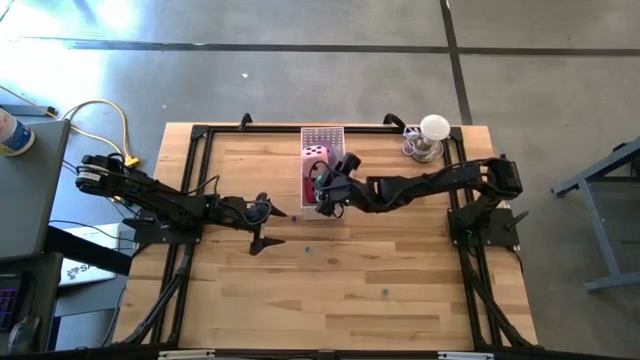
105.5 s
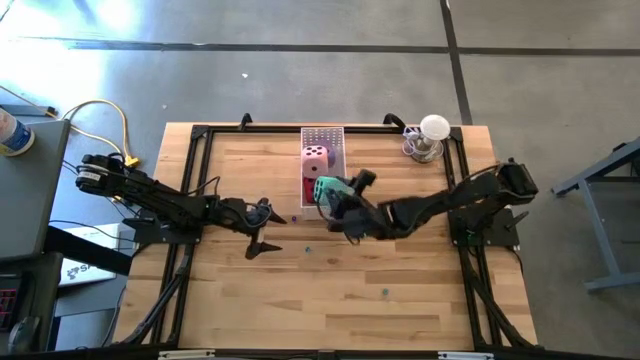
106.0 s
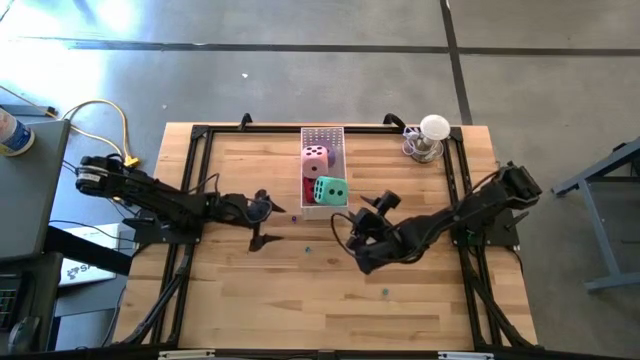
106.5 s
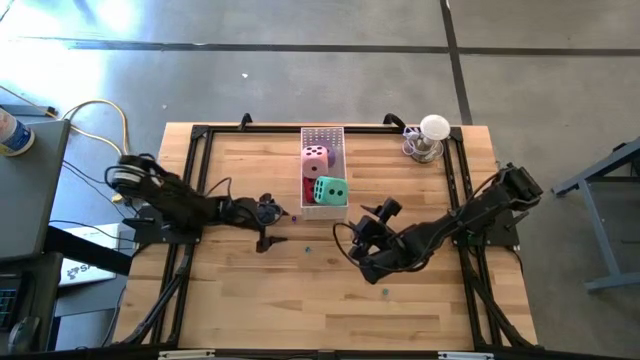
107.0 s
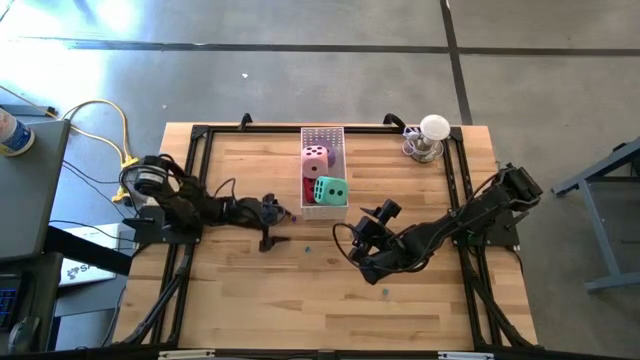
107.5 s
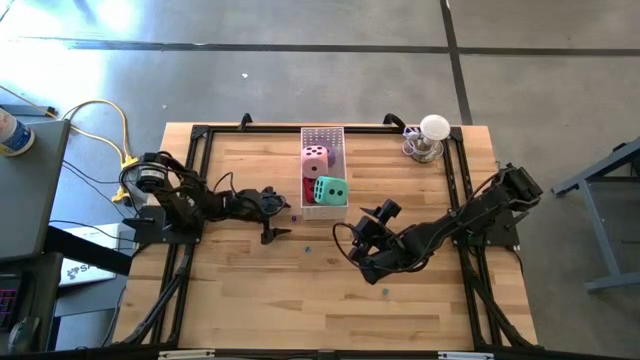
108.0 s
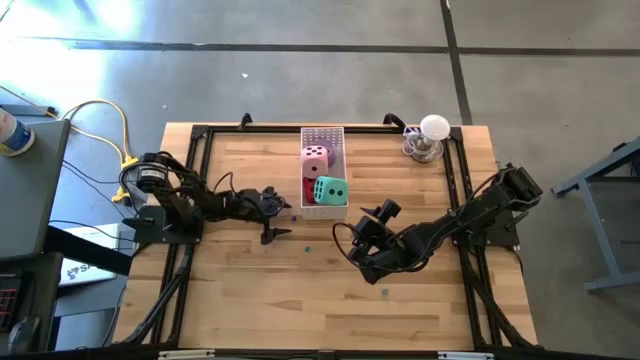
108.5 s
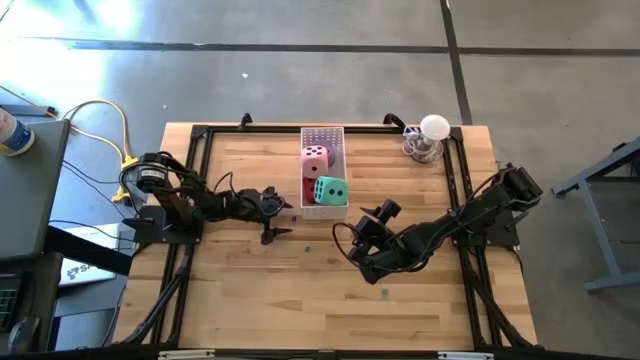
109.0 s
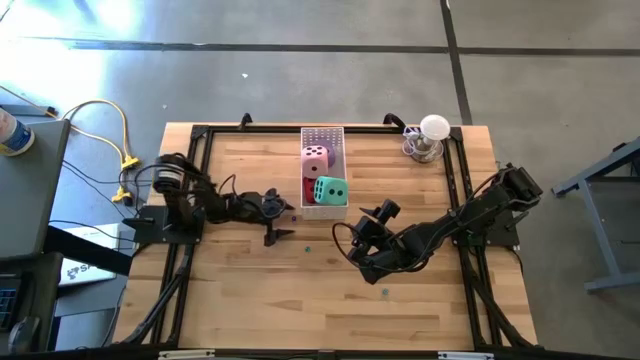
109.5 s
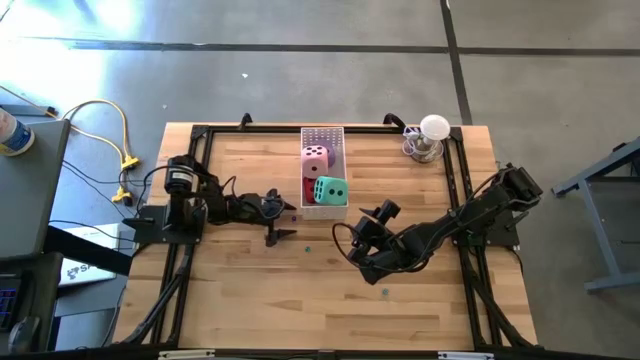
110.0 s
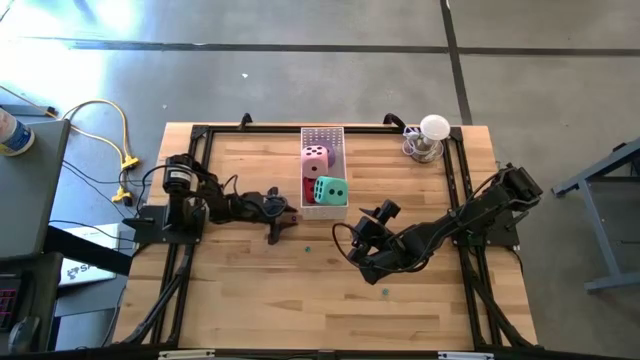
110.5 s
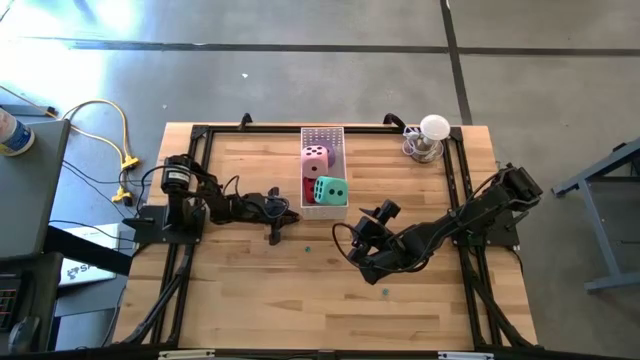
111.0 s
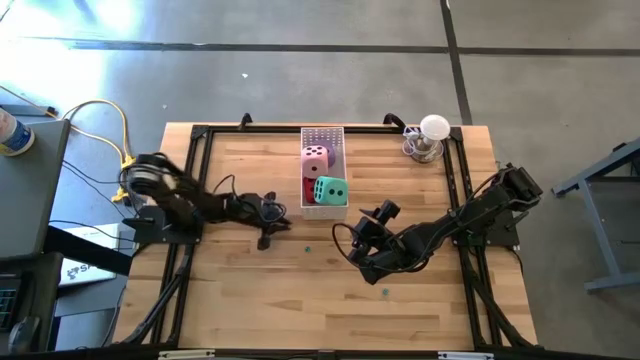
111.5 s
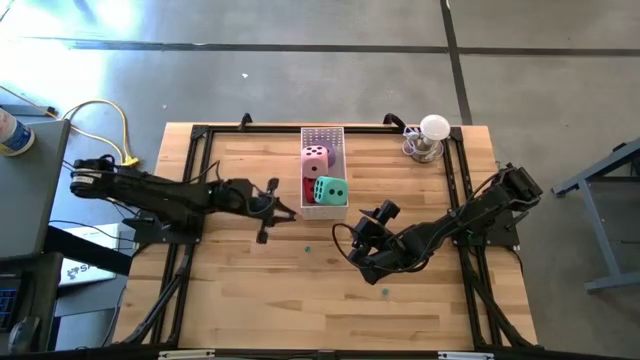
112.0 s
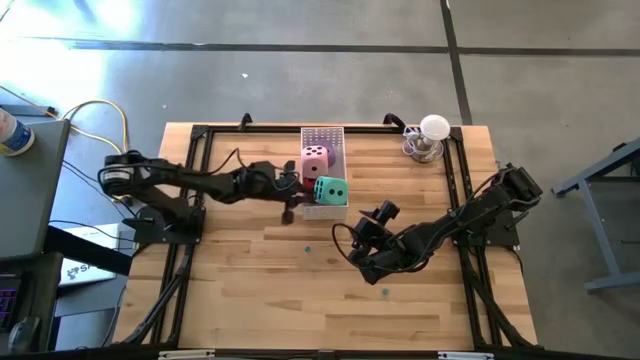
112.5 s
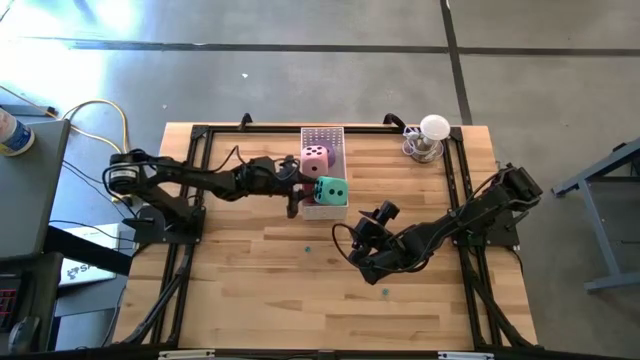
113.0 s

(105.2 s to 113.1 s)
Task: Pick & Place Dice
Put the small dark blue die into the bin

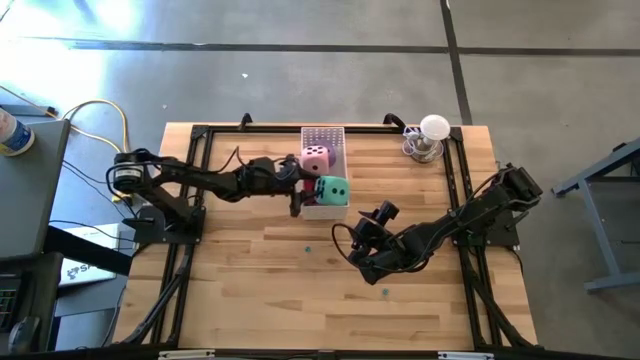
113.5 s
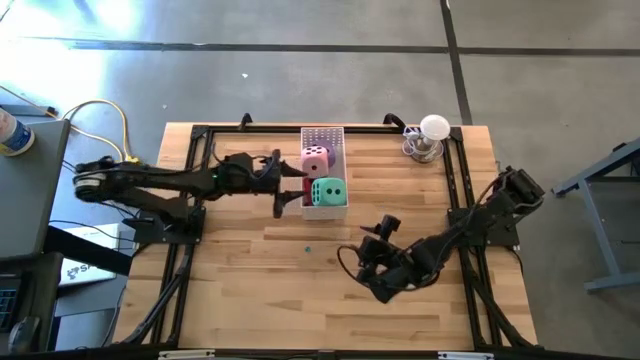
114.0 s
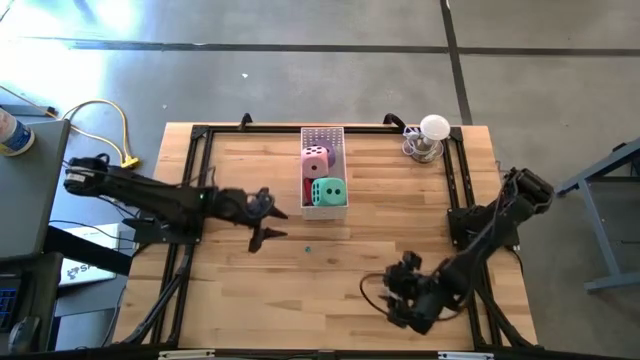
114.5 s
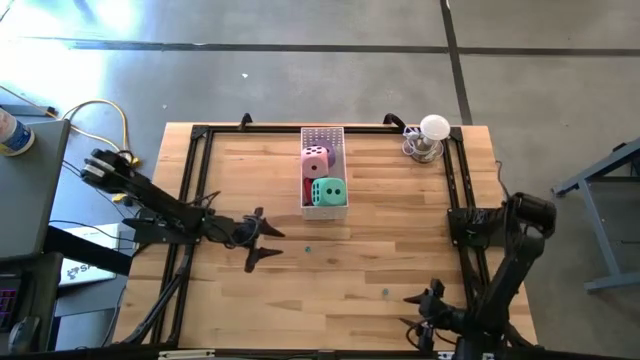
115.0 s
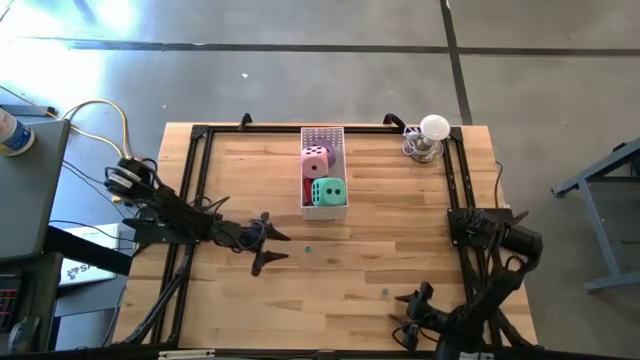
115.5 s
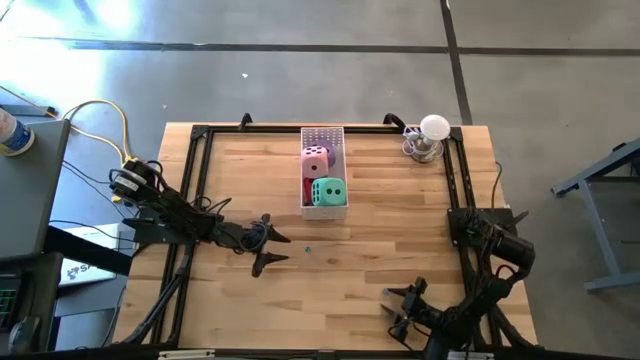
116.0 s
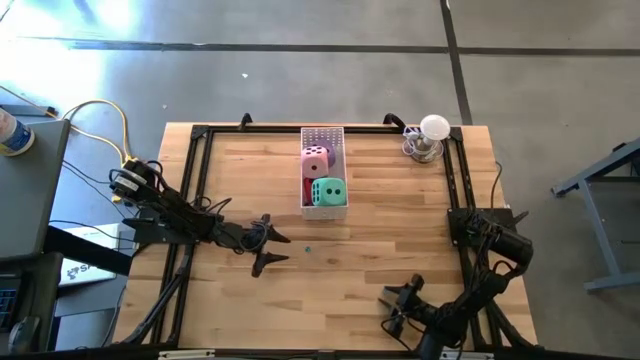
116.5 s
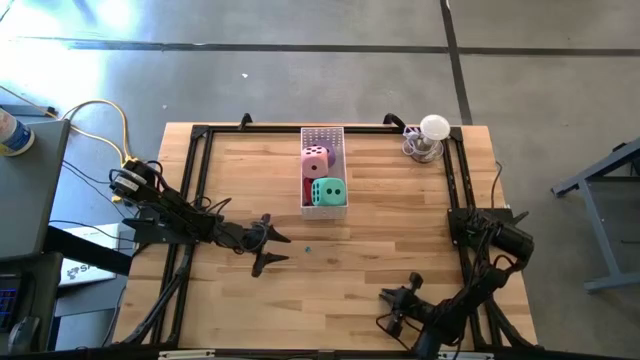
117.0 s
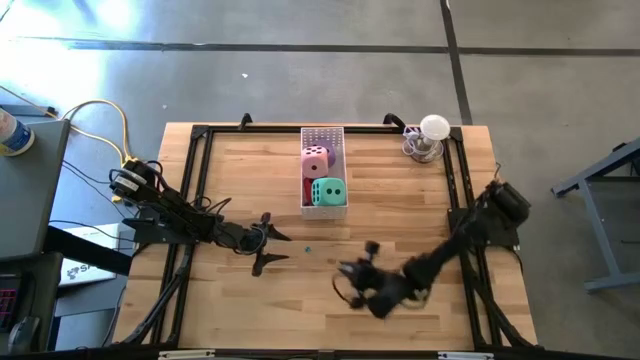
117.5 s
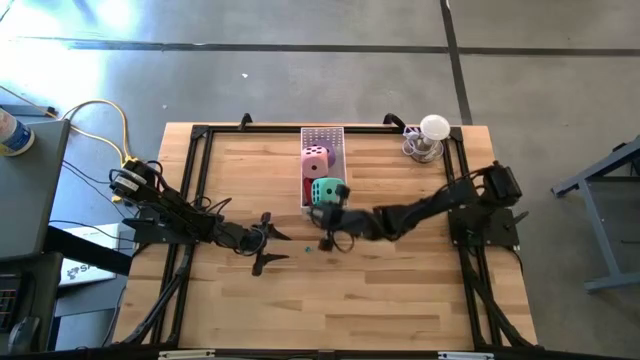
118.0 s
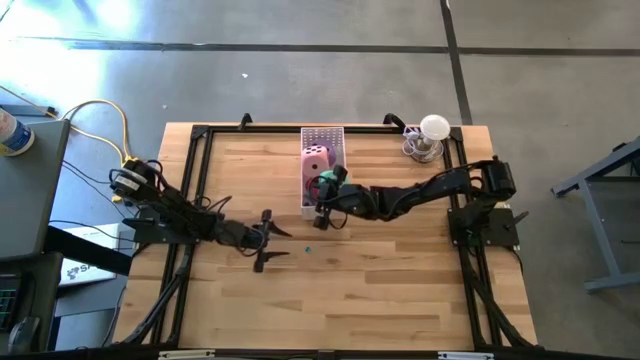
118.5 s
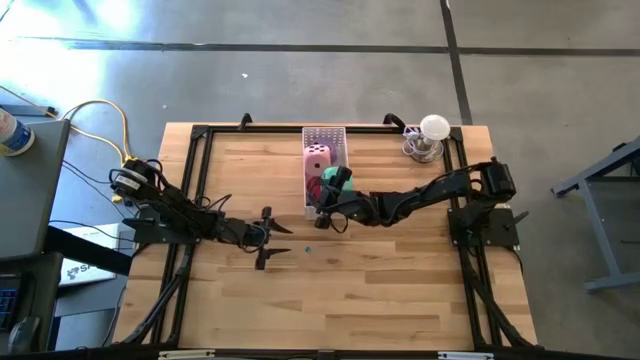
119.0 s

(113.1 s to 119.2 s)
Put the small light blue die into the bin

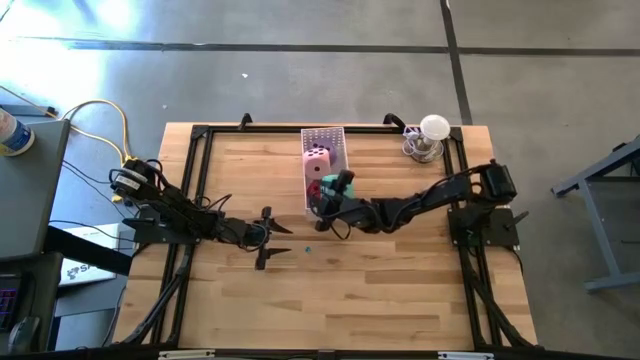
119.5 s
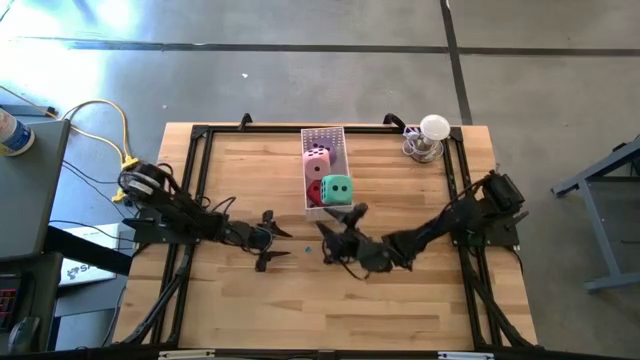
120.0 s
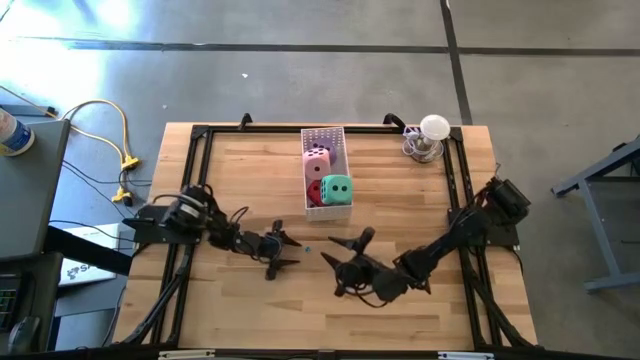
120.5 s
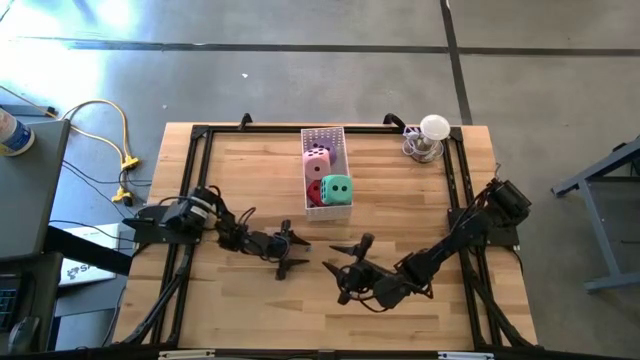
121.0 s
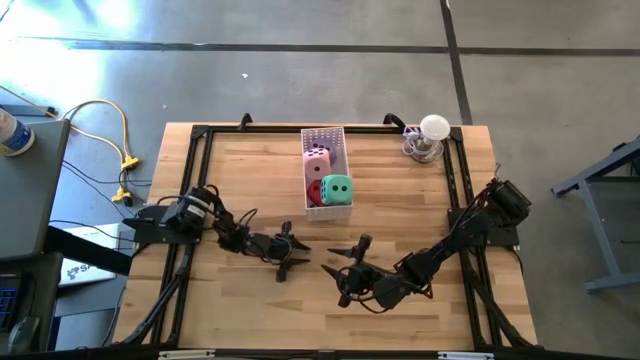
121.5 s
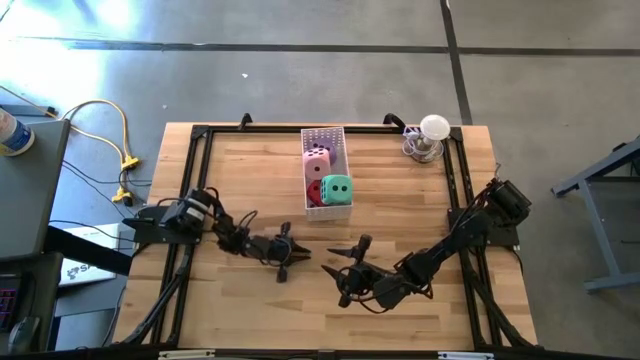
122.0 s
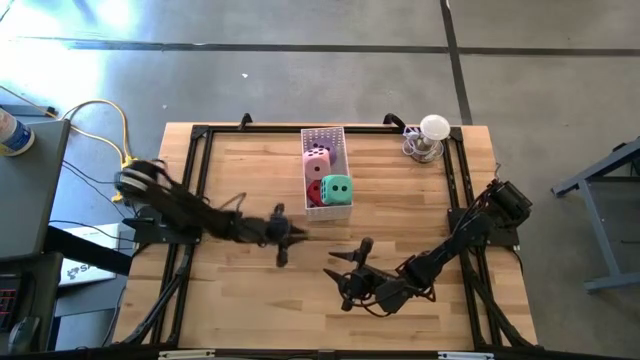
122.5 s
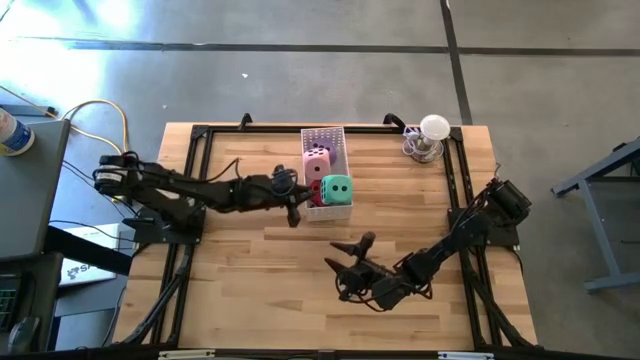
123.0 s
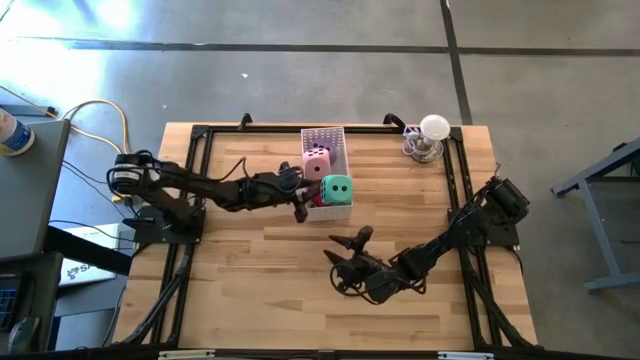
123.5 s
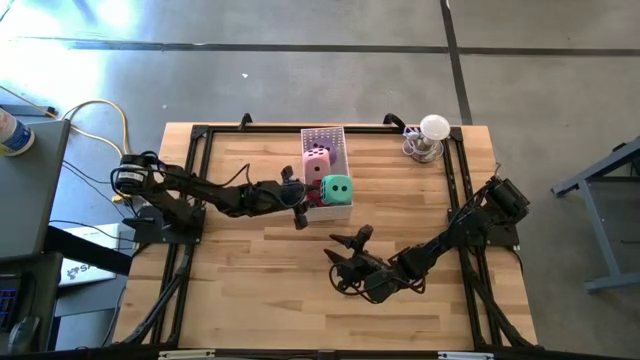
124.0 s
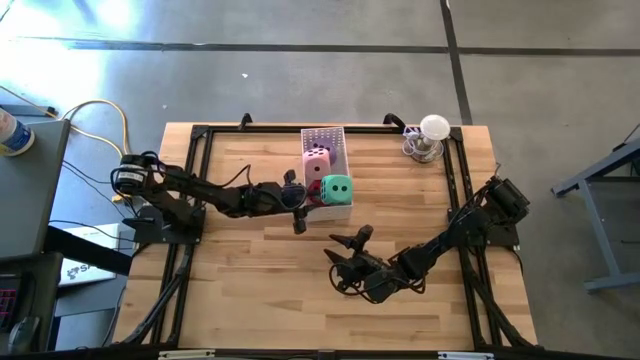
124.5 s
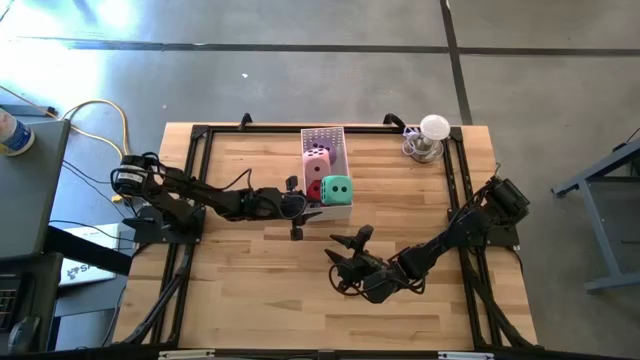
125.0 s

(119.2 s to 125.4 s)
Put the small light blue die into the bin

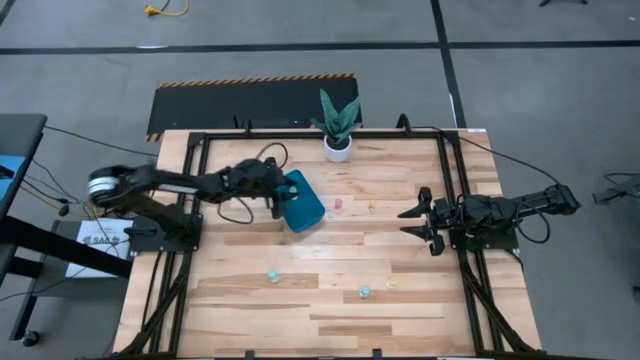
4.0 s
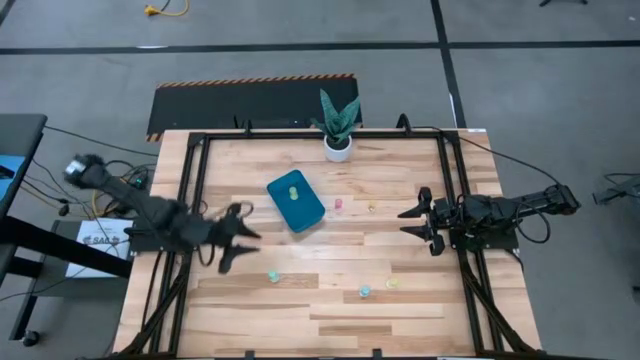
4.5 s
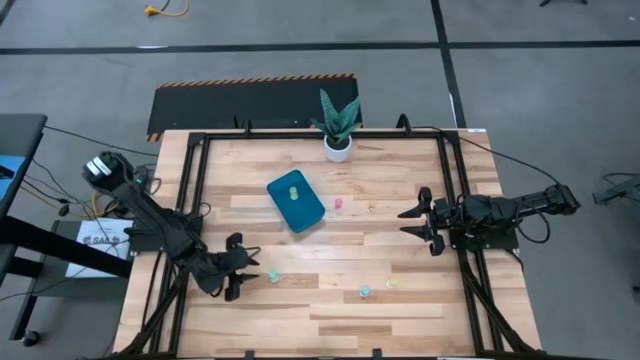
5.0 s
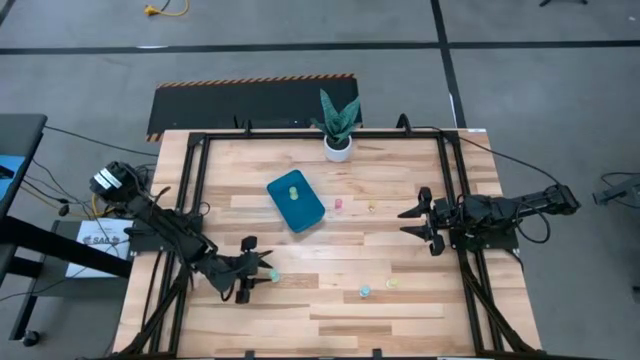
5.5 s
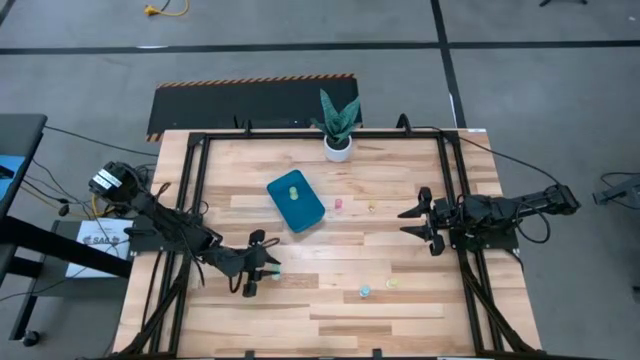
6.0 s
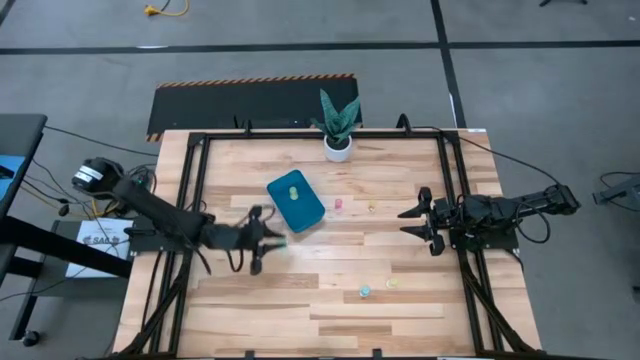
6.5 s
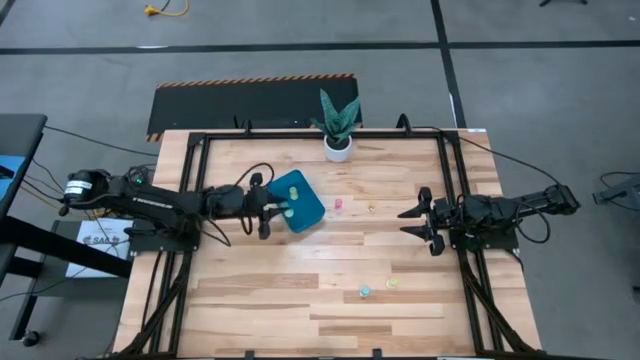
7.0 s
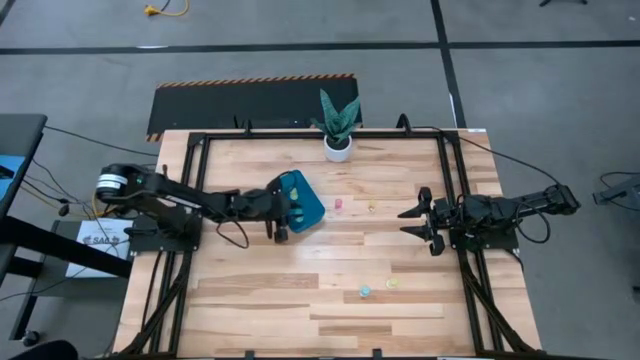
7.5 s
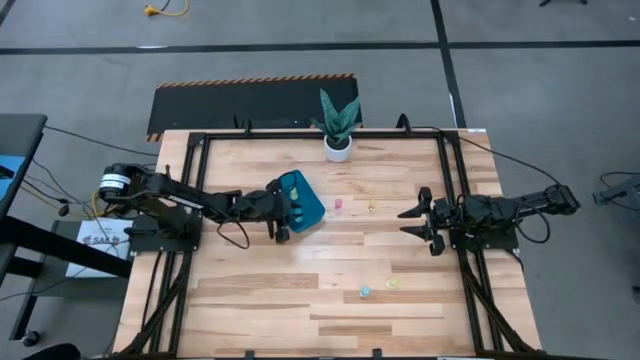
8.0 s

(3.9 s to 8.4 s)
Task: Pick and place pill bottles into a basket
Put the left blue medicine bottle into the blue bin
